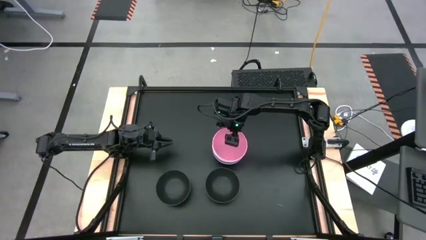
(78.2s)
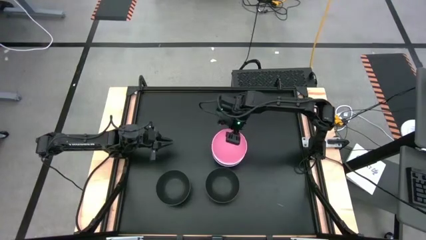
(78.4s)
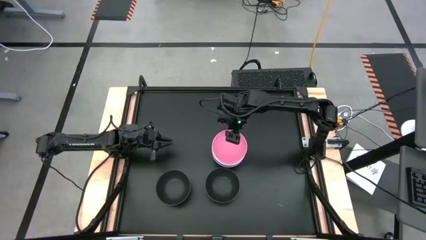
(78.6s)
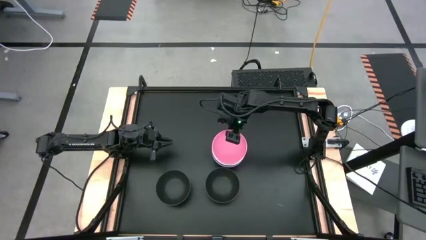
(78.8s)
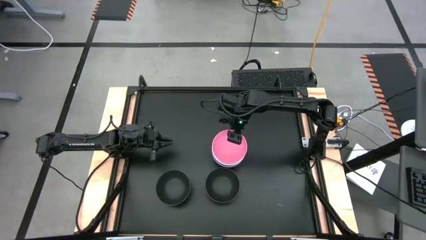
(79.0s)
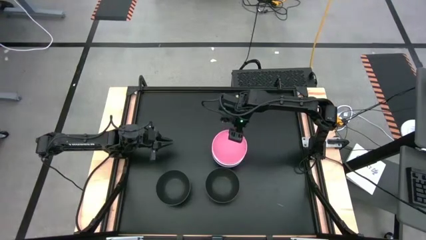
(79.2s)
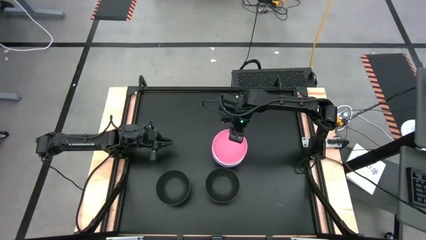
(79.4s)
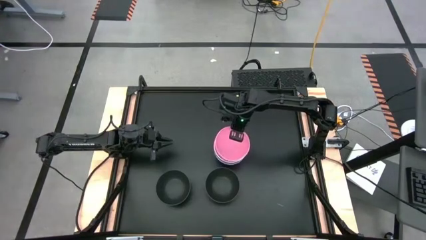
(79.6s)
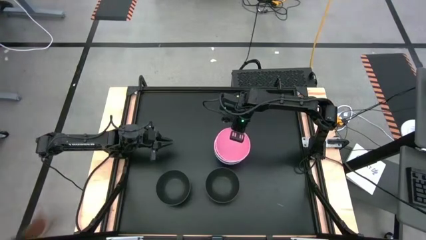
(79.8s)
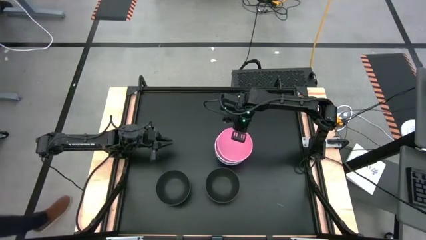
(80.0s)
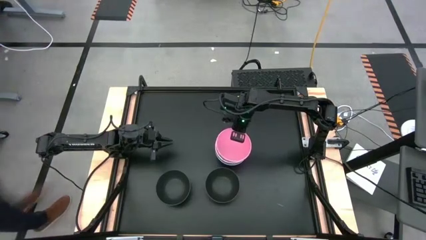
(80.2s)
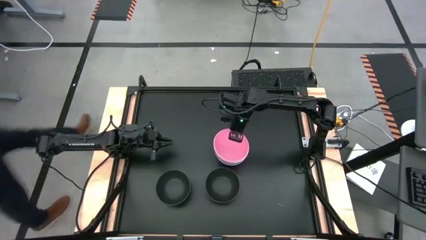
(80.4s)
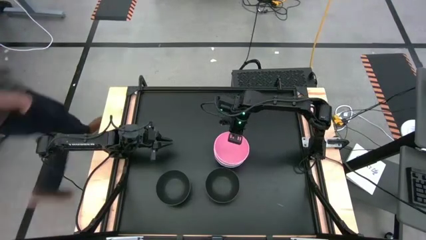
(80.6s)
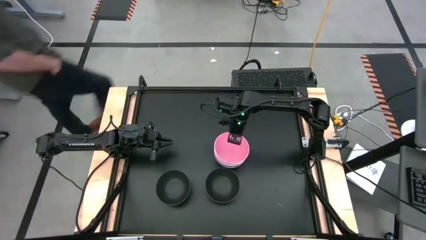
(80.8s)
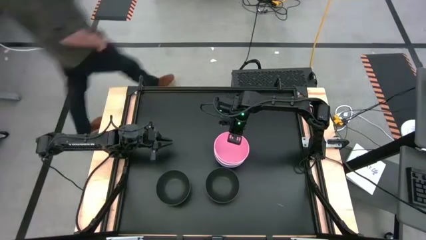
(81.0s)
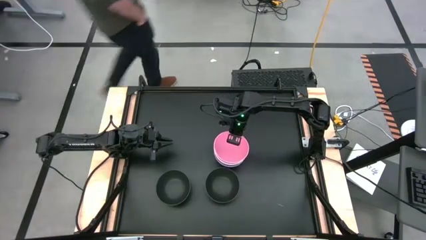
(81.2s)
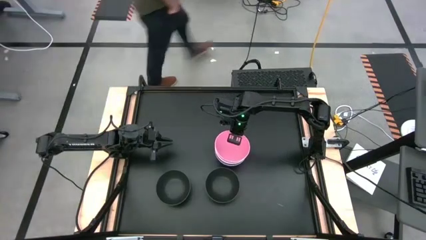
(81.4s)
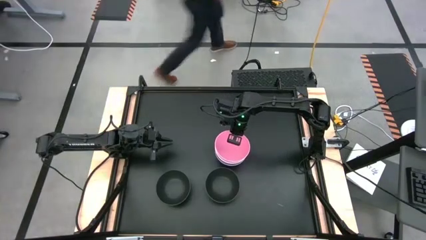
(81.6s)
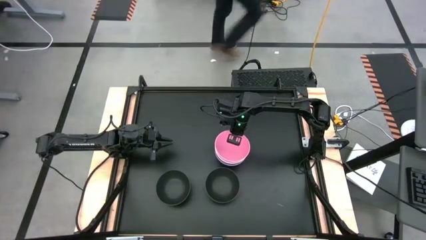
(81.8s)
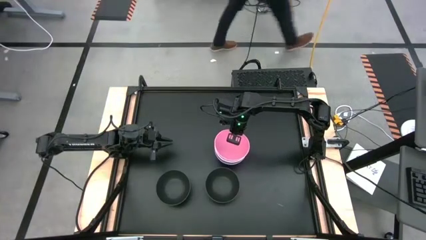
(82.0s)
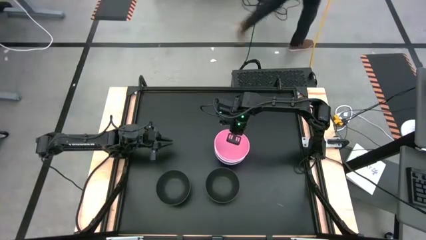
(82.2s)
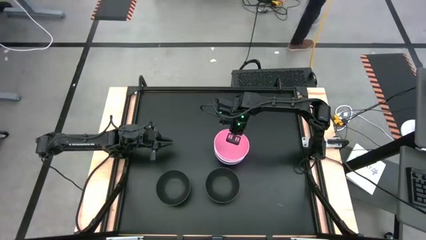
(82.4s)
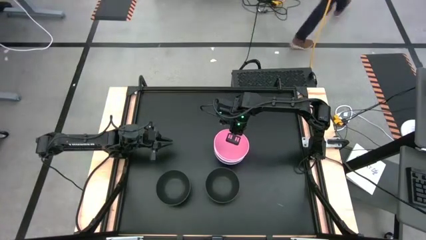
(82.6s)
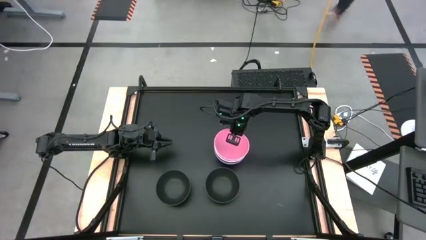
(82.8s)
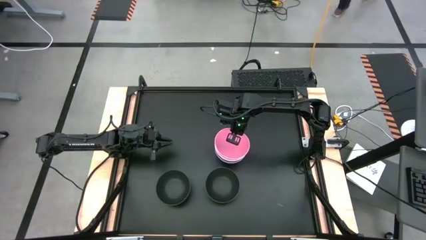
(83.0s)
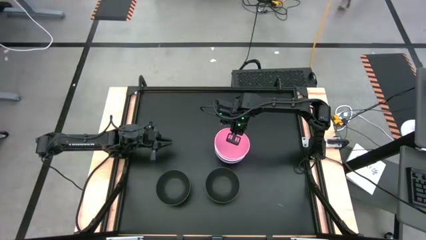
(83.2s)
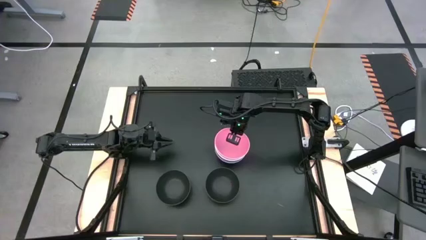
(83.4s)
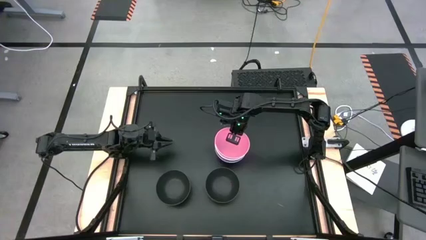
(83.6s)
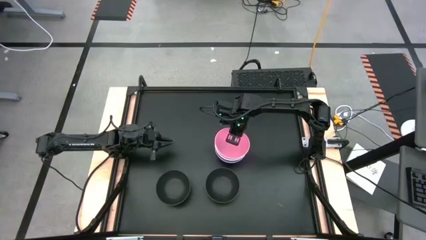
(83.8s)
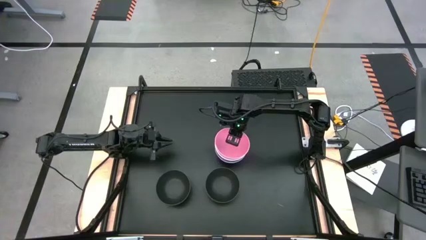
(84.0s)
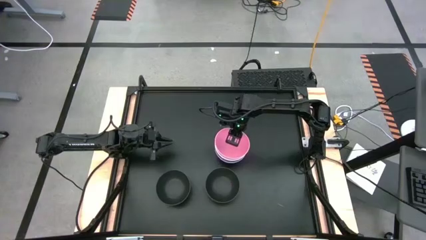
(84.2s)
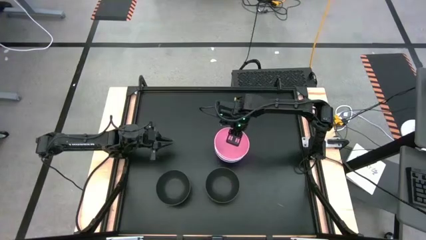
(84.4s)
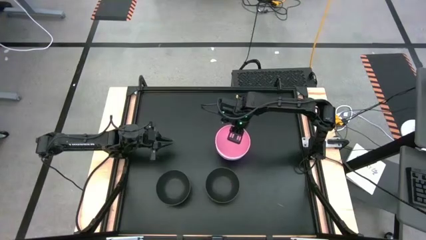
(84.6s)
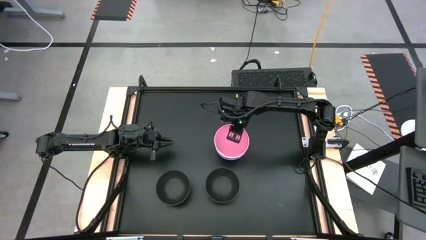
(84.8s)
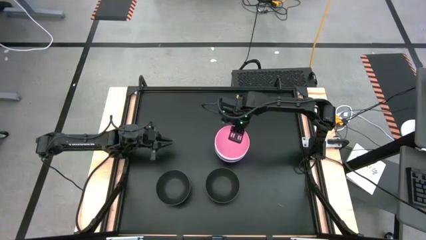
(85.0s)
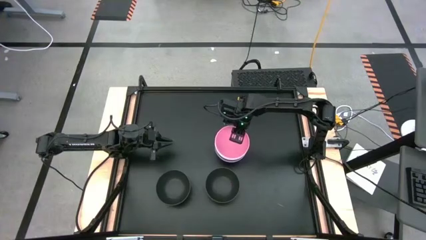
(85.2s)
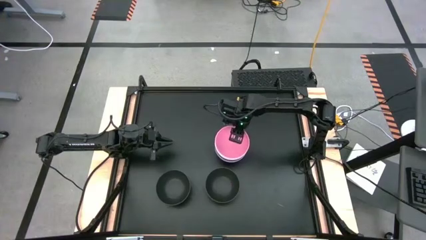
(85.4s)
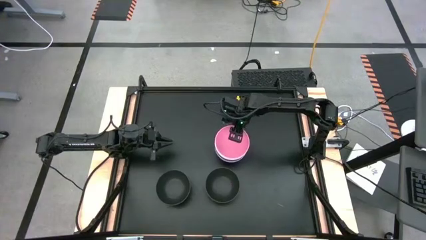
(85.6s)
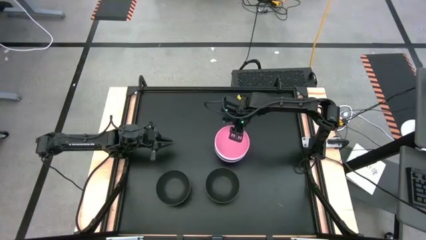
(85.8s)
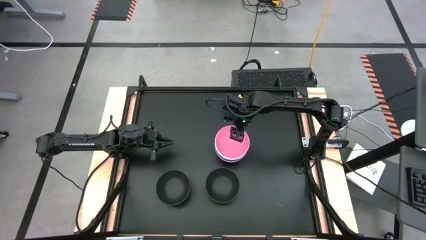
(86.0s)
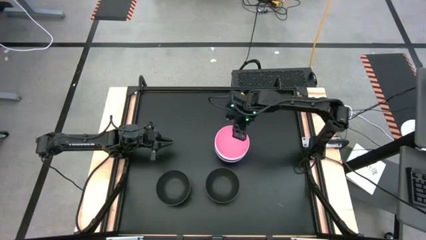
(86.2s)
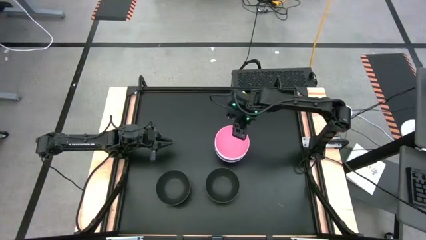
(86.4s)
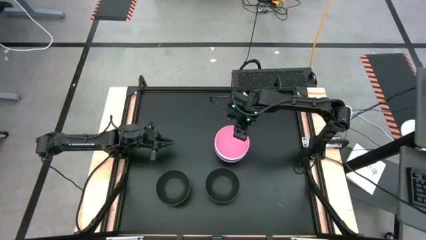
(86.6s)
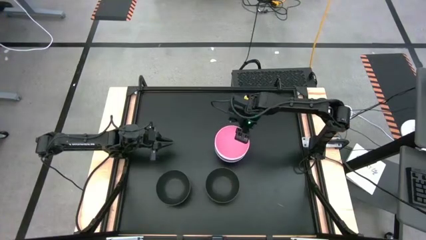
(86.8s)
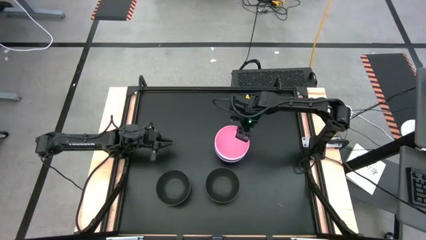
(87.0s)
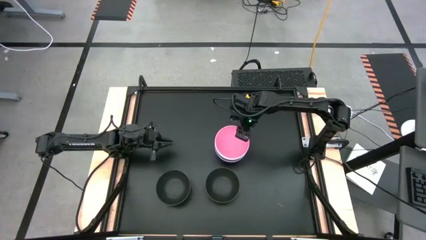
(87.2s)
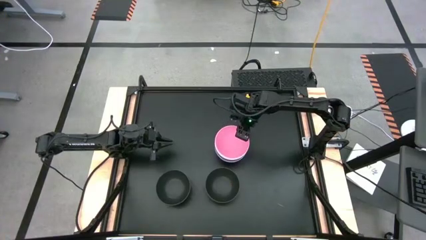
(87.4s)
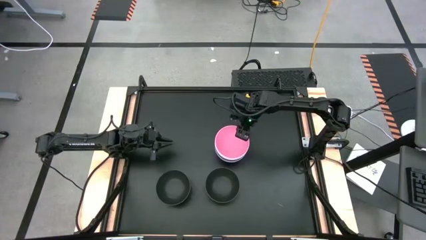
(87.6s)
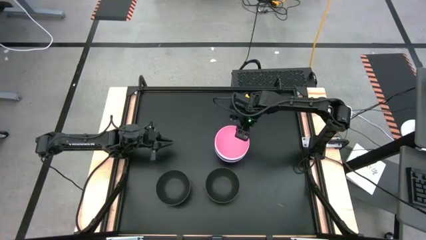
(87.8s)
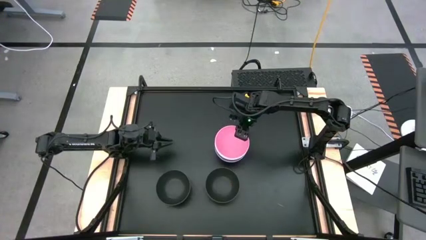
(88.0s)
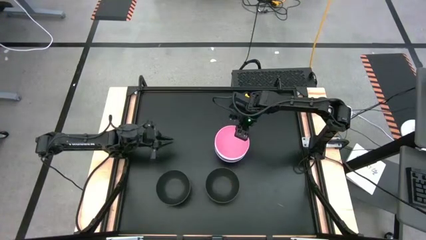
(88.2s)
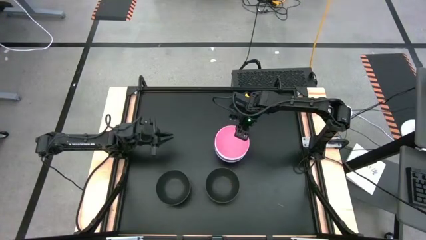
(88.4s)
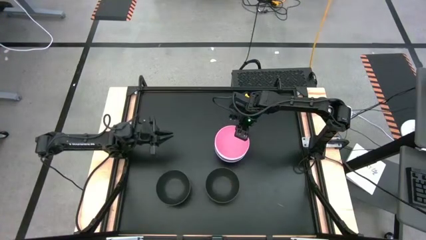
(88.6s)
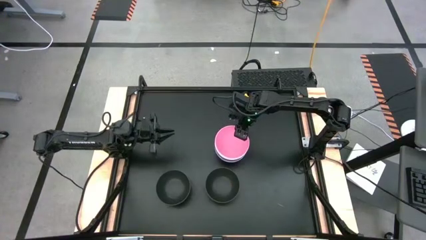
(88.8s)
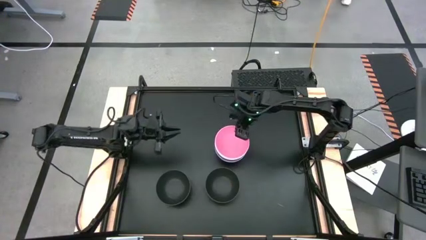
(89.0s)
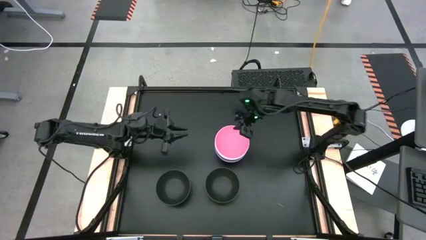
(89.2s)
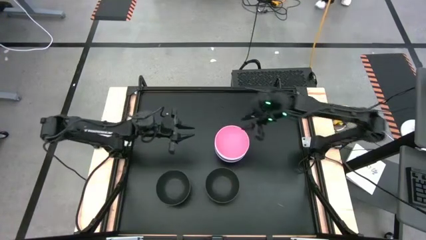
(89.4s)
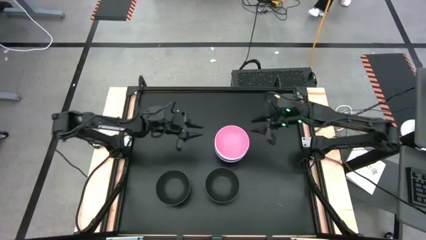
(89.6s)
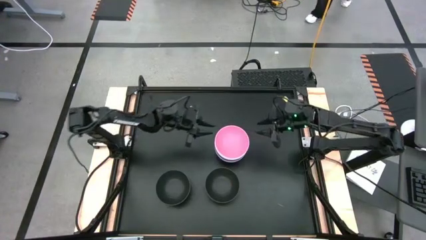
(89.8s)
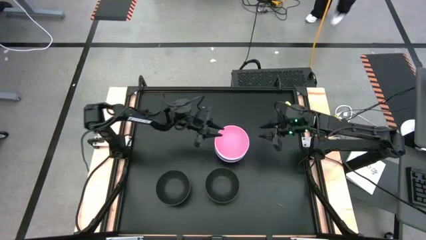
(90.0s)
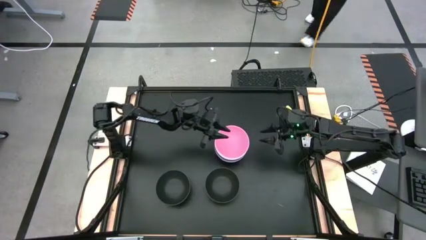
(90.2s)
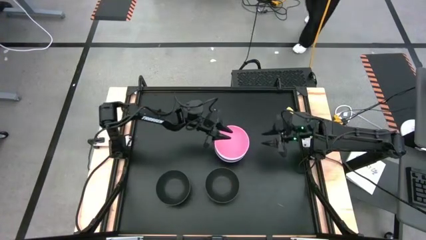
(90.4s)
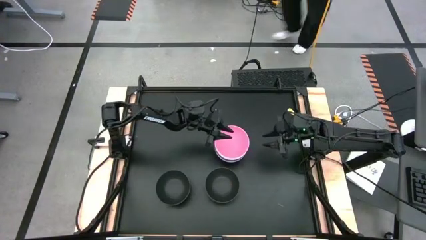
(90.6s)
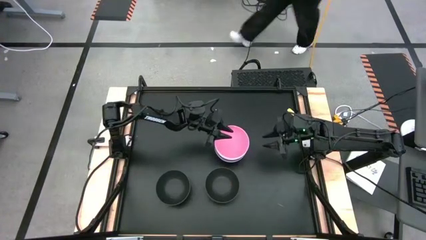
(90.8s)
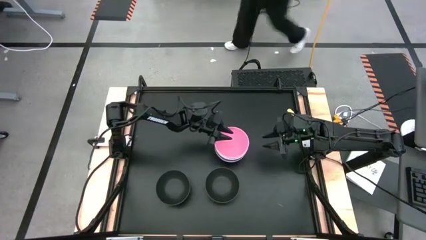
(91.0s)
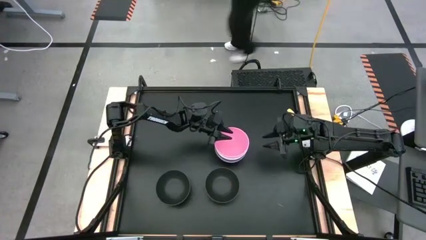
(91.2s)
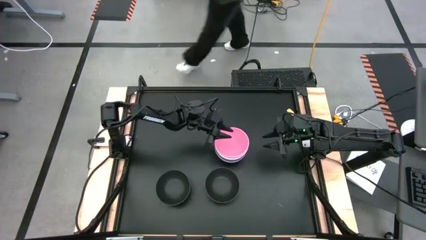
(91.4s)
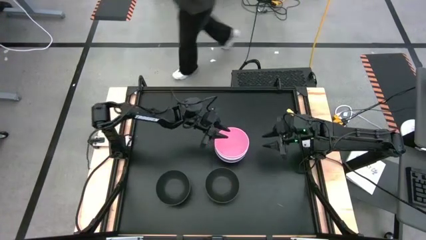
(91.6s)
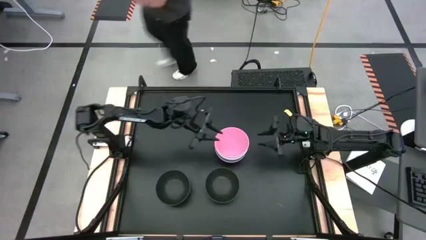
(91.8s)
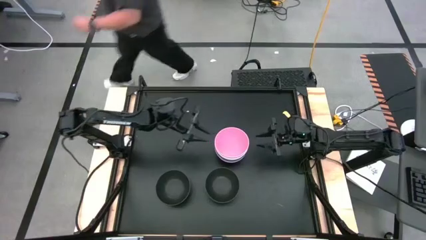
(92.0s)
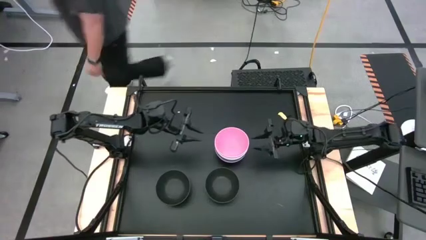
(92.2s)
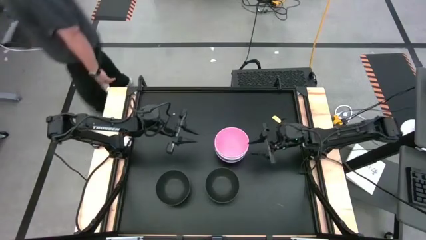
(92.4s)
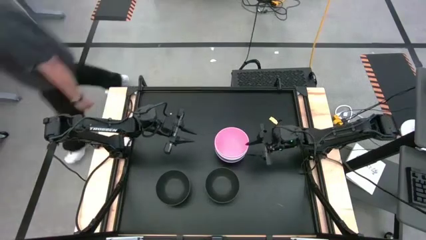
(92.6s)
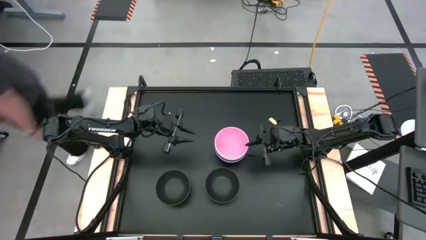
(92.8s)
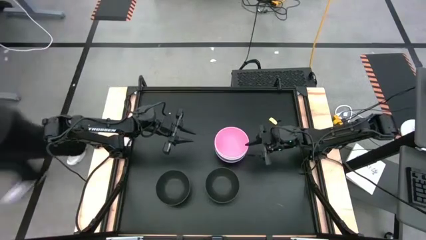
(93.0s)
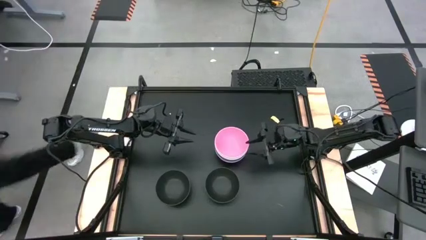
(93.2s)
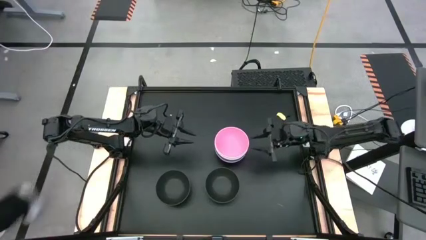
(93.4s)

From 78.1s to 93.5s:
Task: Nest bowls inside each other
Stack the pink bowl on top of the white bowl
